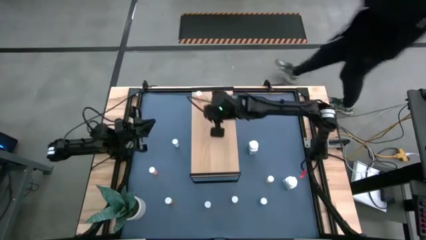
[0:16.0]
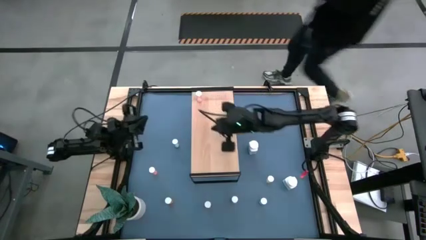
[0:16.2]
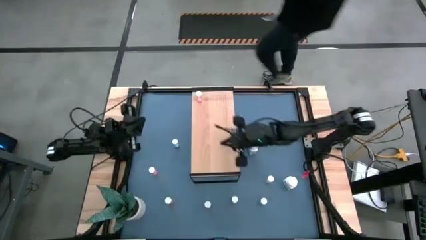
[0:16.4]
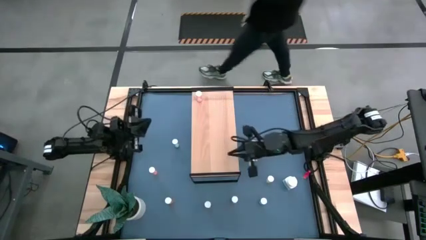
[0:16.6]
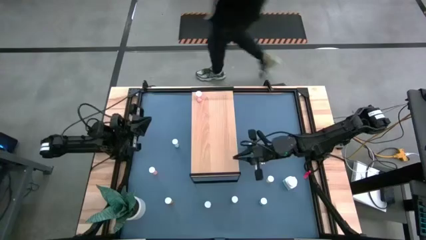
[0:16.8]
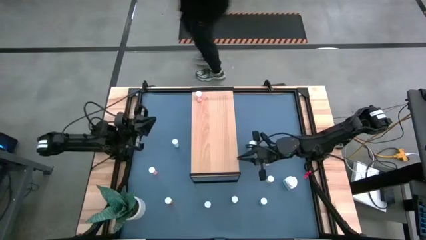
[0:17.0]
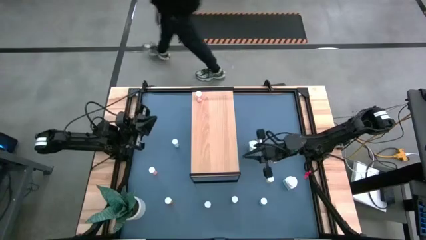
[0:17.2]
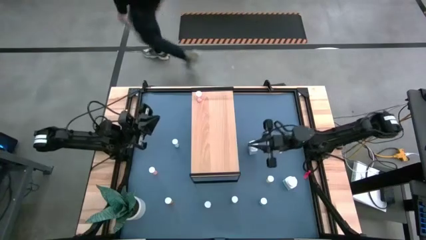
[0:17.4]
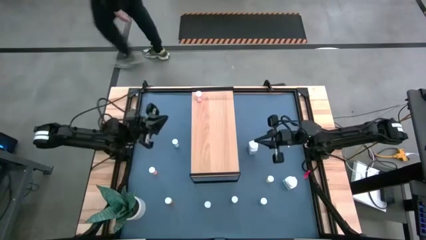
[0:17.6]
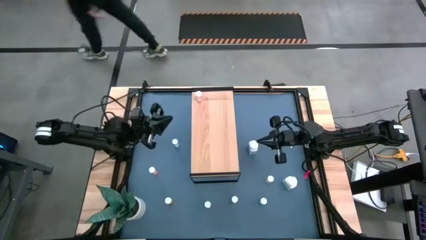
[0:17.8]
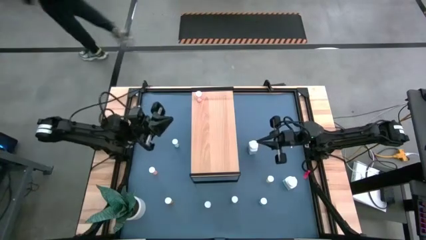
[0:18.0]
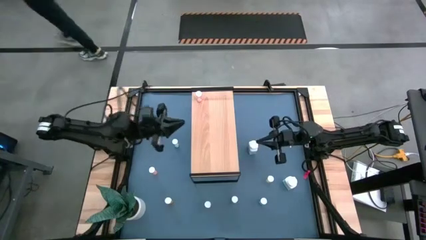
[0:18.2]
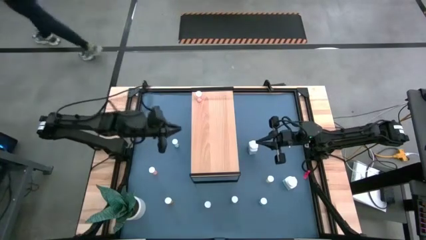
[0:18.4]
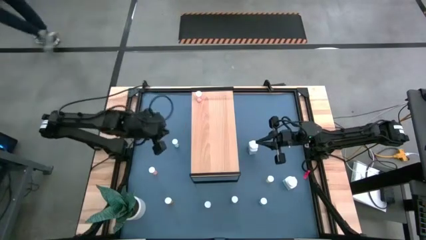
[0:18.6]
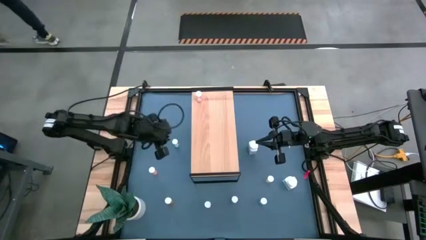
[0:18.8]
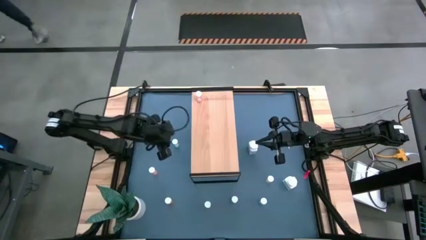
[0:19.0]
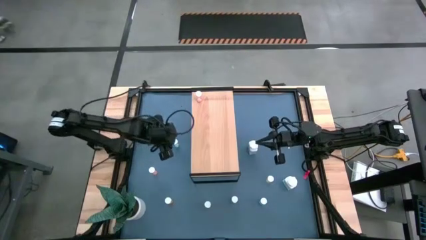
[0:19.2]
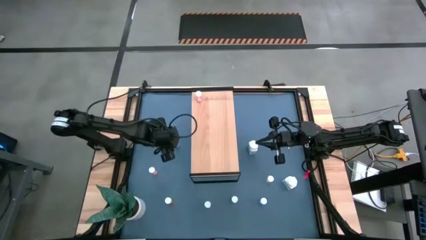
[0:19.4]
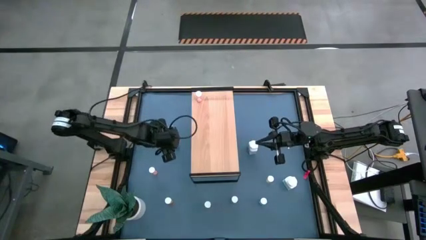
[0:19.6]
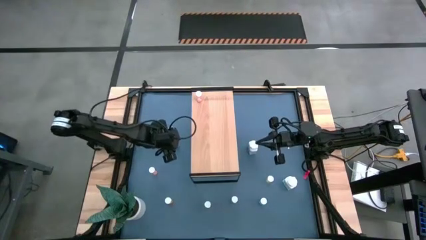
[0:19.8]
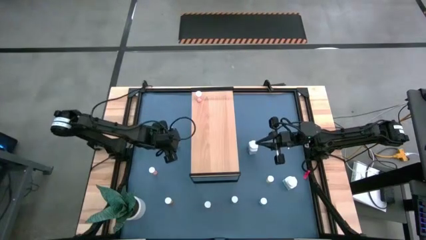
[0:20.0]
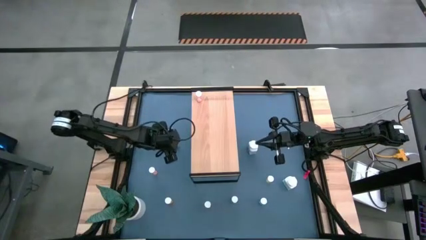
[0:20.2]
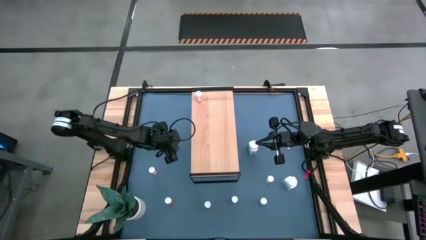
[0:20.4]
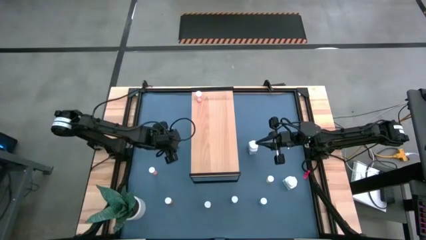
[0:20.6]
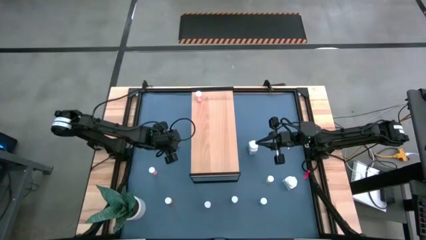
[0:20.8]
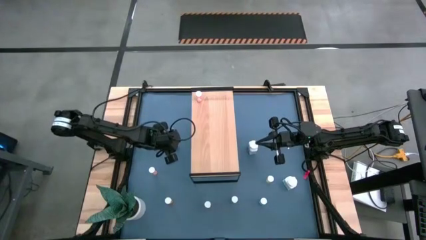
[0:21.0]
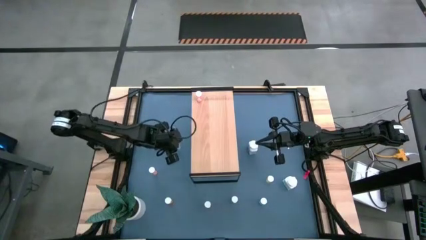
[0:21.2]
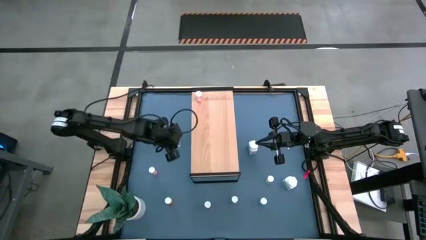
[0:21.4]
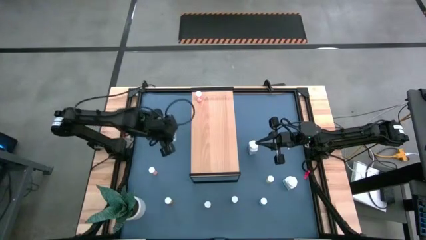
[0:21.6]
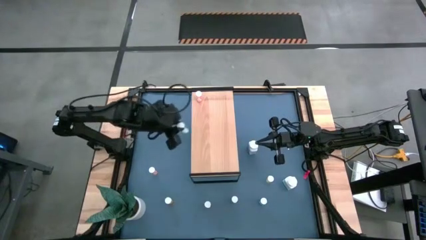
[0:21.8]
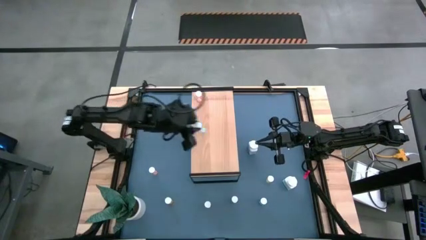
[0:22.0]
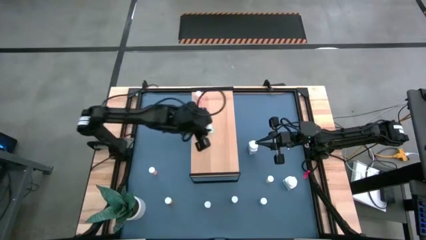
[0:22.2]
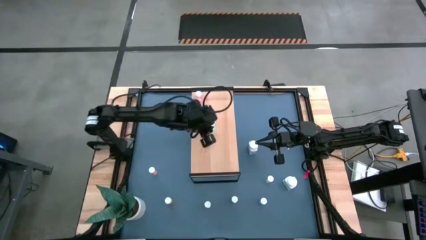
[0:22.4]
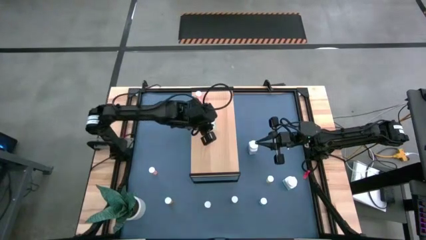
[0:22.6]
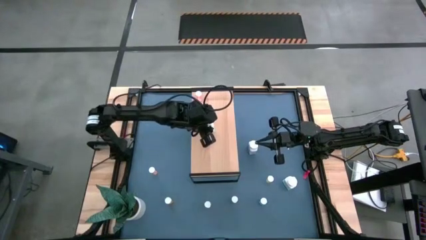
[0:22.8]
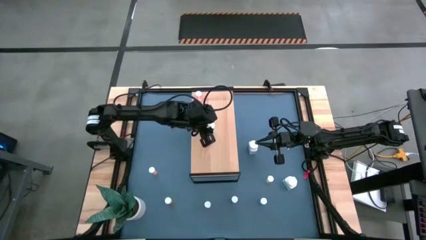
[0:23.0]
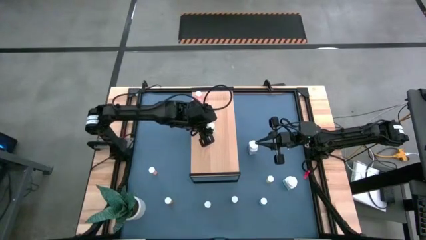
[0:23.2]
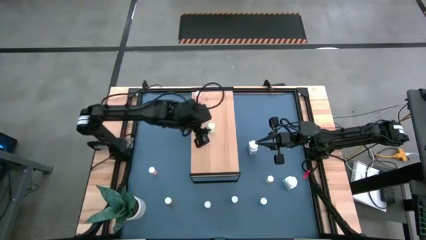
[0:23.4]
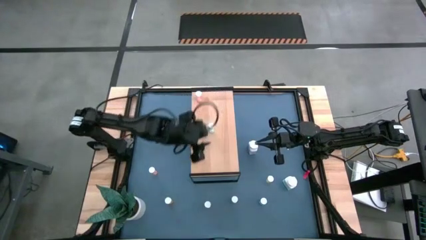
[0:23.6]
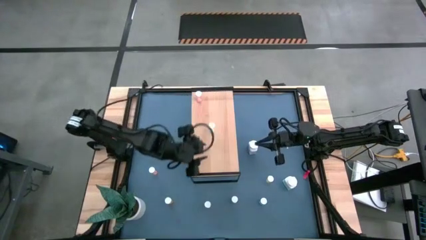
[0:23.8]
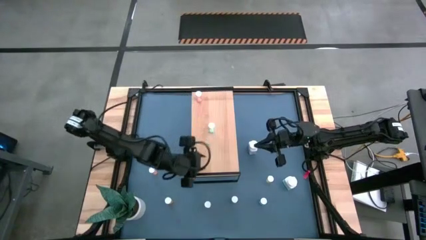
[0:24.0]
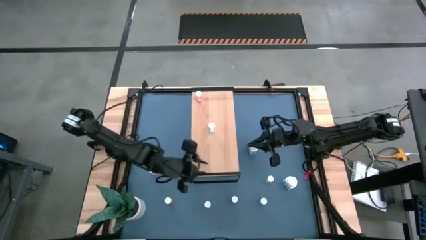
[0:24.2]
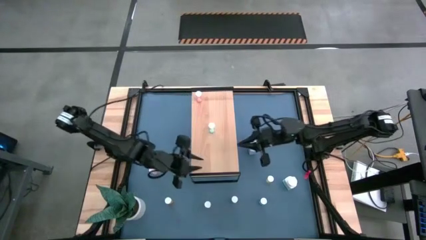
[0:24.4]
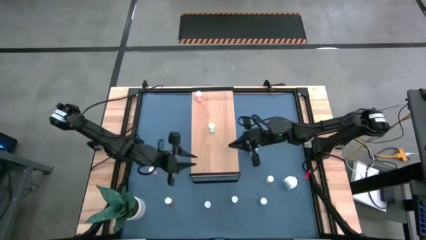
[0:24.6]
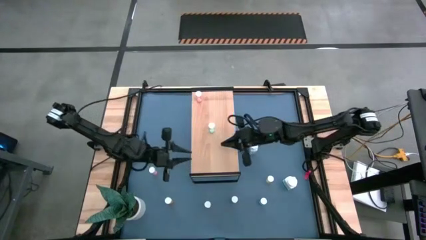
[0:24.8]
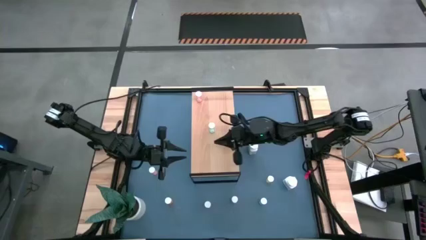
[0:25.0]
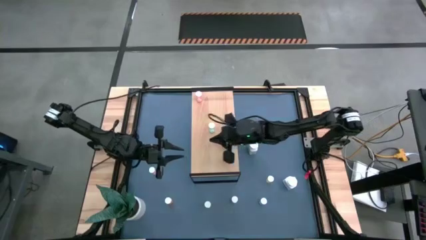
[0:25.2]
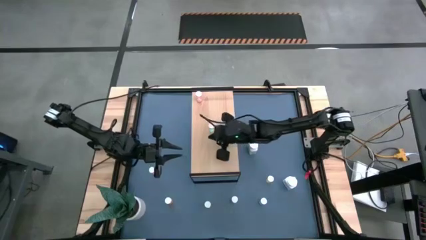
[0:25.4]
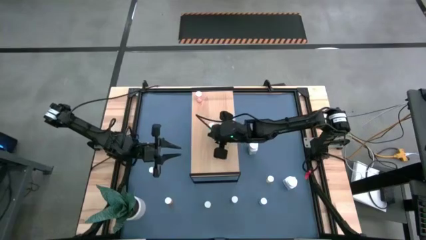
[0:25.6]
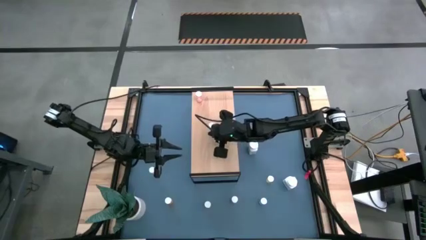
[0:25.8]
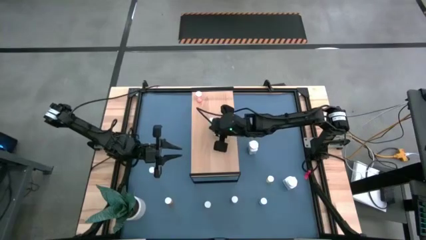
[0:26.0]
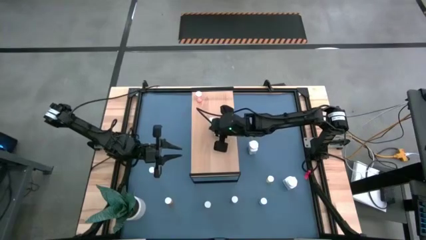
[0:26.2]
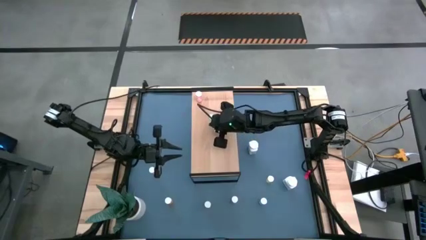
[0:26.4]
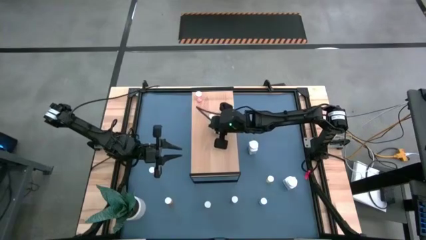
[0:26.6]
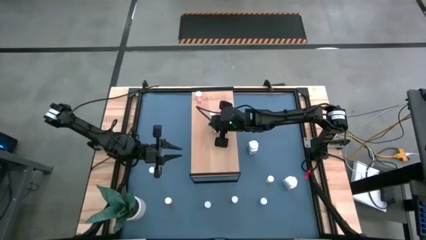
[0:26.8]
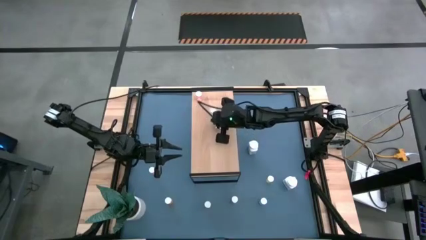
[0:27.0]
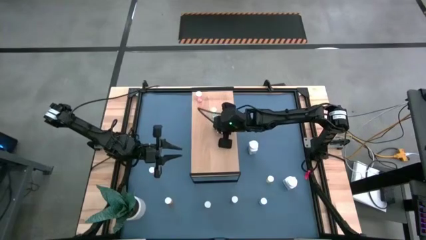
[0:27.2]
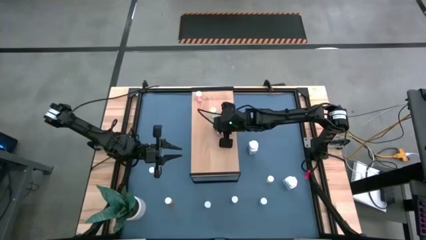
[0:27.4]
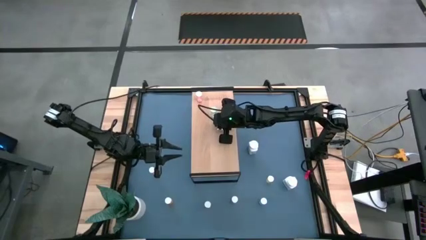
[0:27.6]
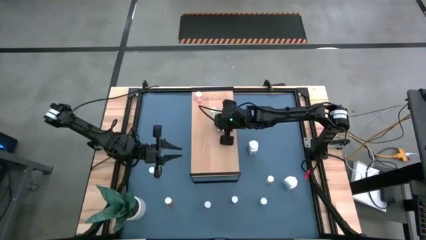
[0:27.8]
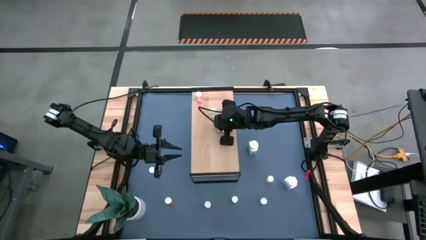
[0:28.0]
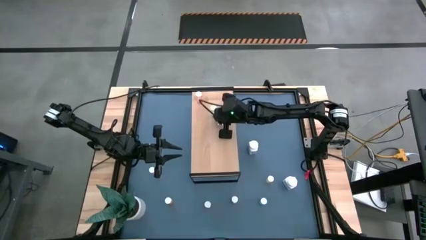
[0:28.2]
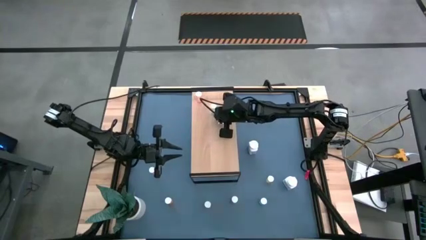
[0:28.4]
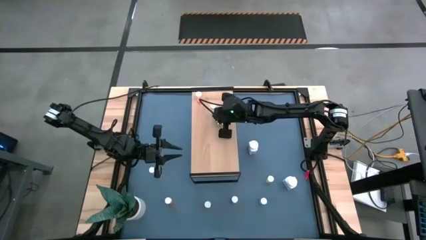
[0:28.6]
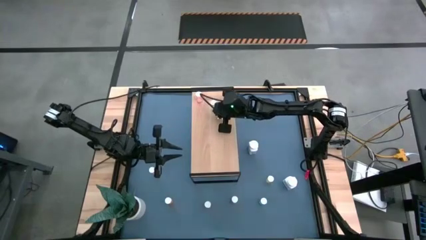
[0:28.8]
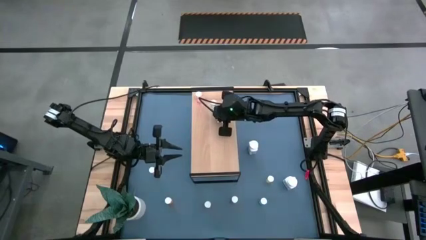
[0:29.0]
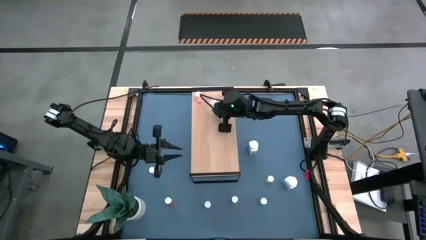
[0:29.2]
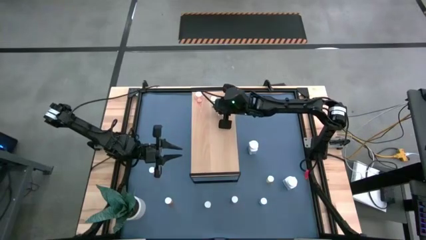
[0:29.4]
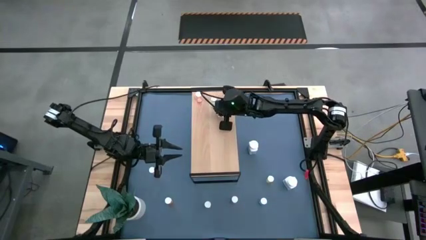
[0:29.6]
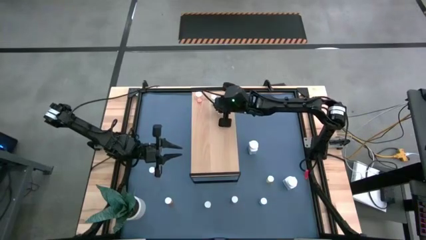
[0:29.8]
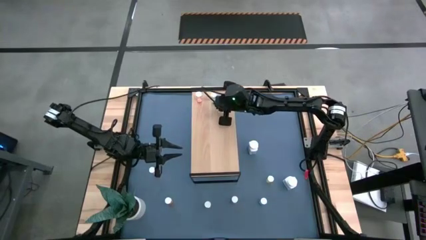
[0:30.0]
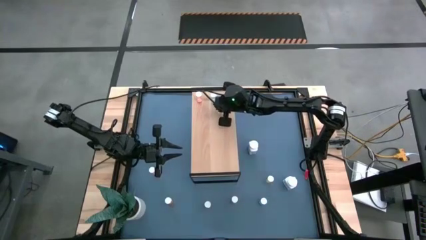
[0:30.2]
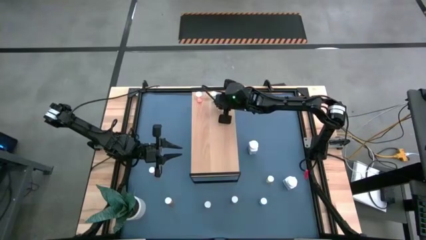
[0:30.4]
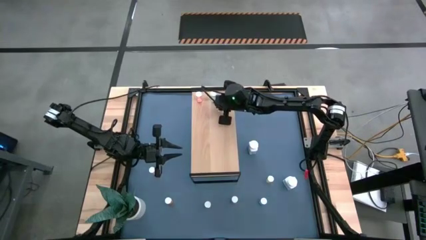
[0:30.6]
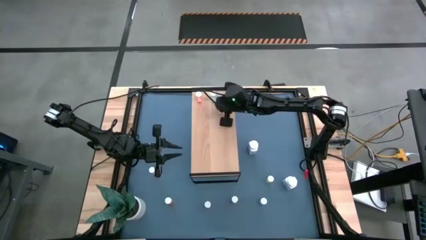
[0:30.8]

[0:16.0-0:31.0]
Task: Pick and place medicine bottles onto shelf by color
Put the light blue pill bottle aligned with the pink pill bottle on the shelf
